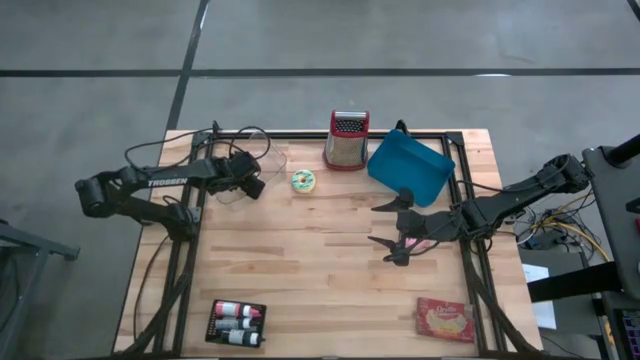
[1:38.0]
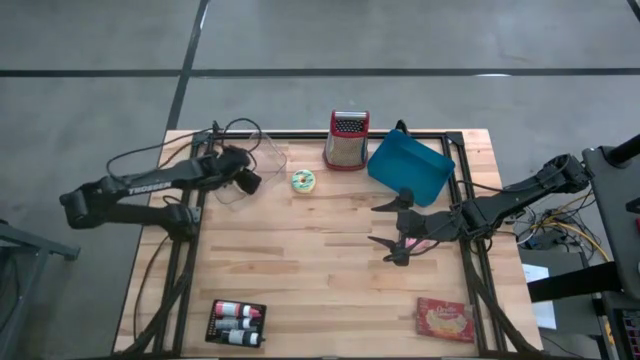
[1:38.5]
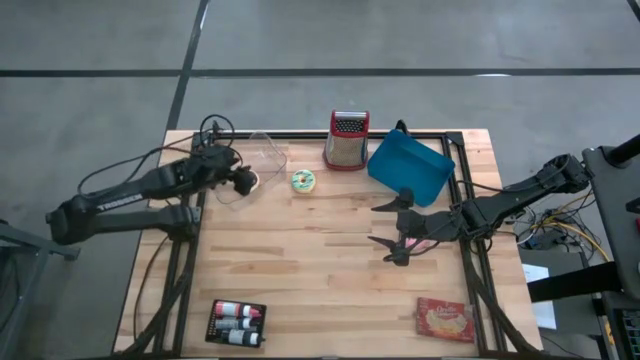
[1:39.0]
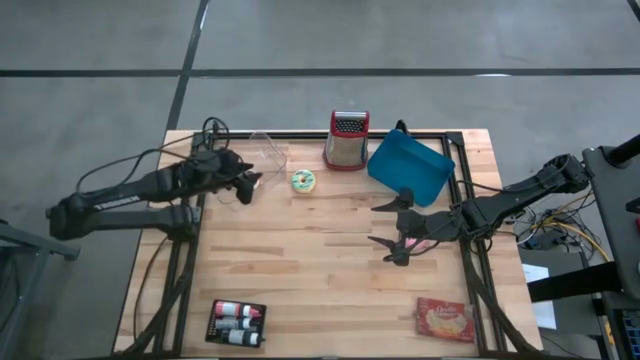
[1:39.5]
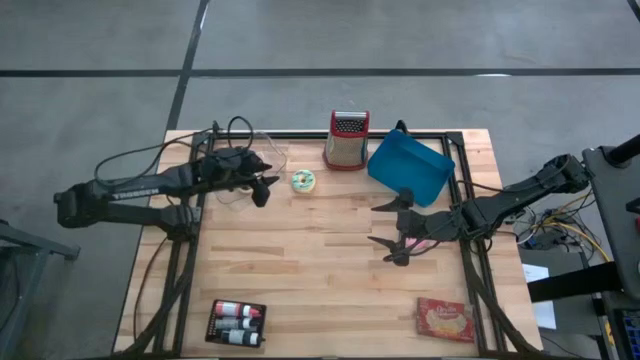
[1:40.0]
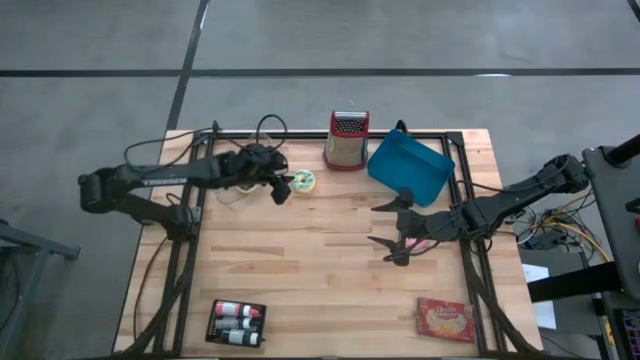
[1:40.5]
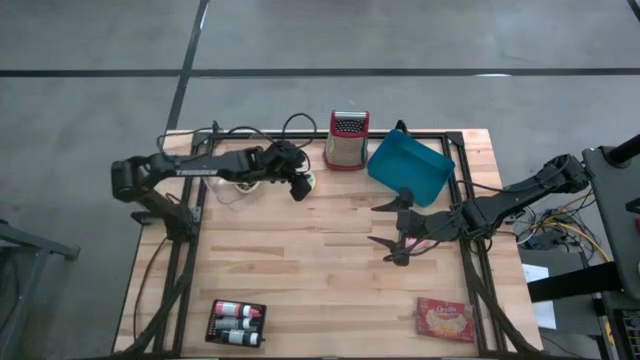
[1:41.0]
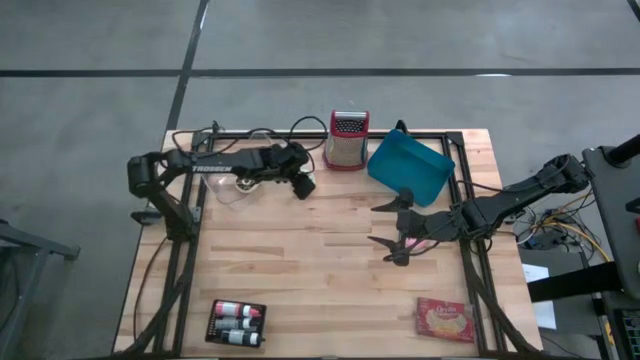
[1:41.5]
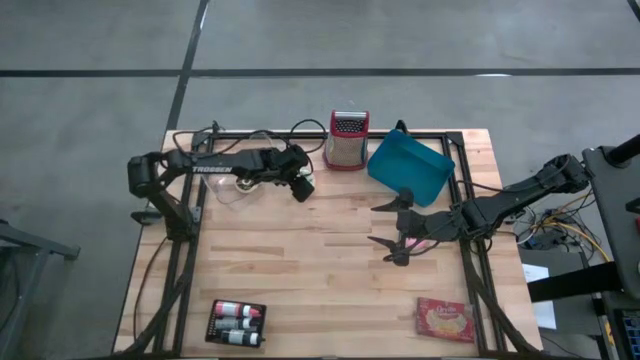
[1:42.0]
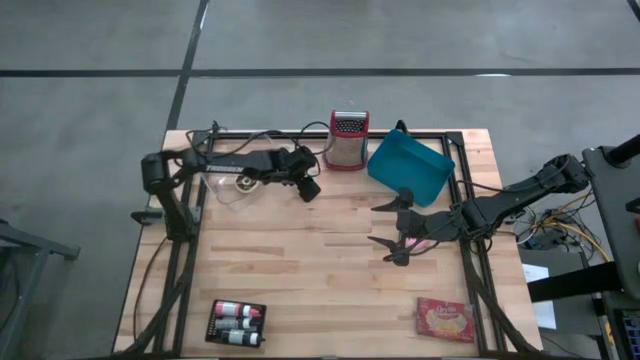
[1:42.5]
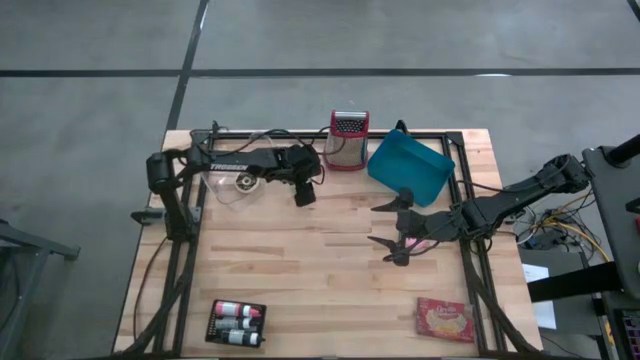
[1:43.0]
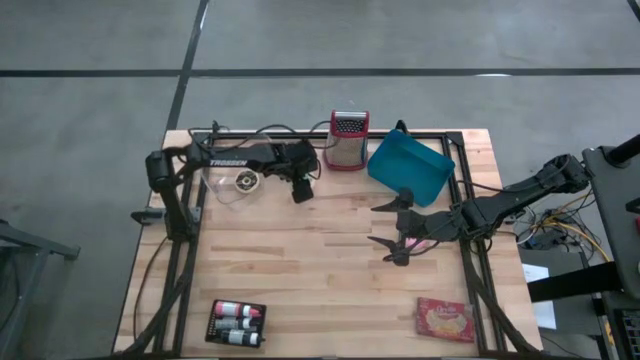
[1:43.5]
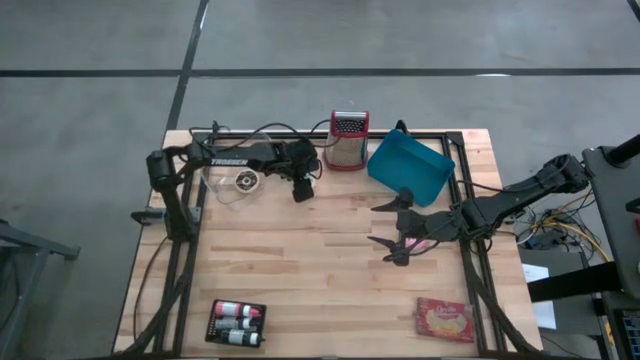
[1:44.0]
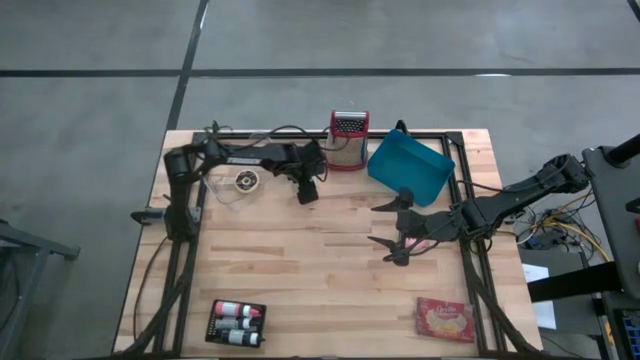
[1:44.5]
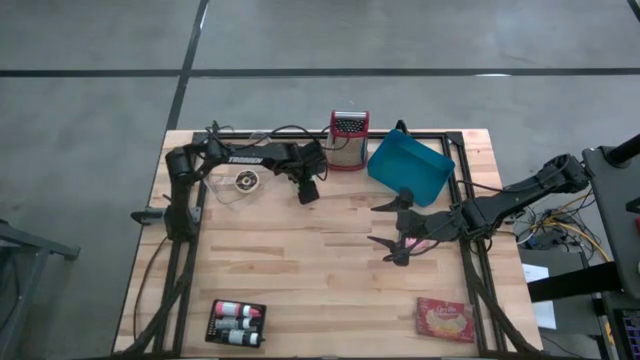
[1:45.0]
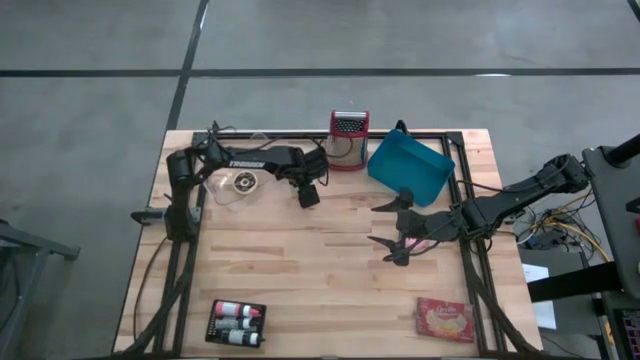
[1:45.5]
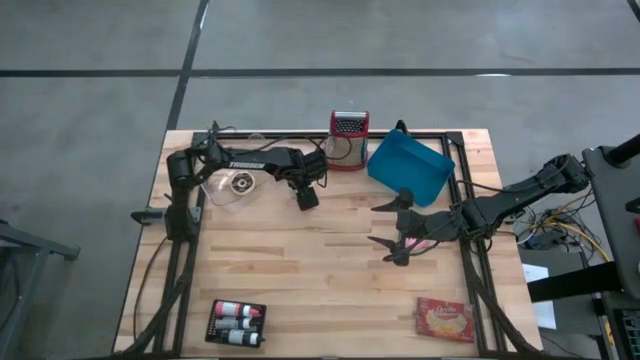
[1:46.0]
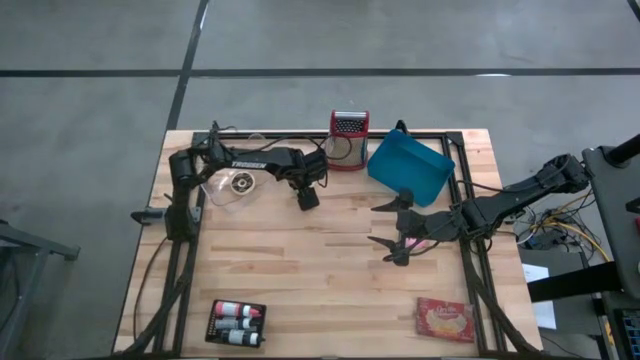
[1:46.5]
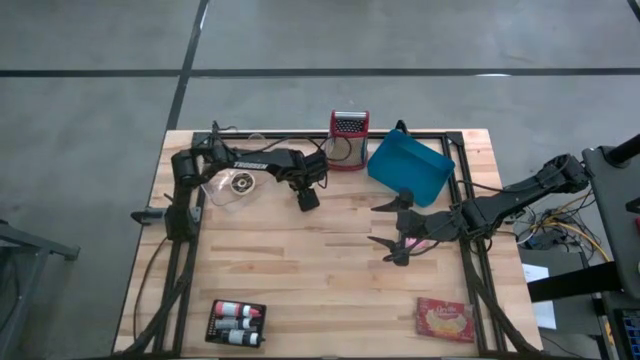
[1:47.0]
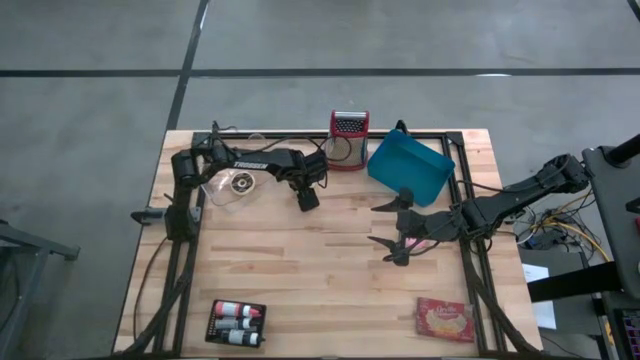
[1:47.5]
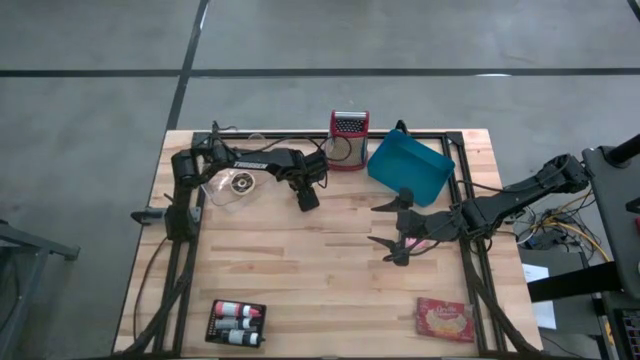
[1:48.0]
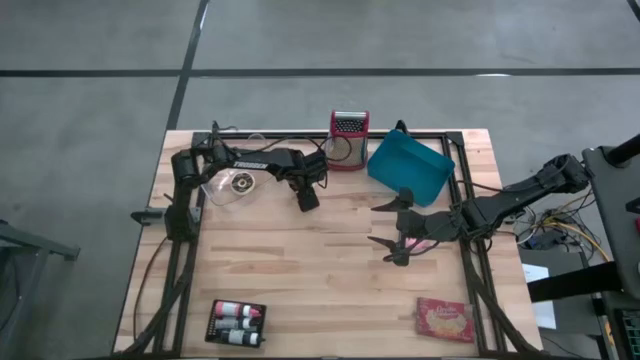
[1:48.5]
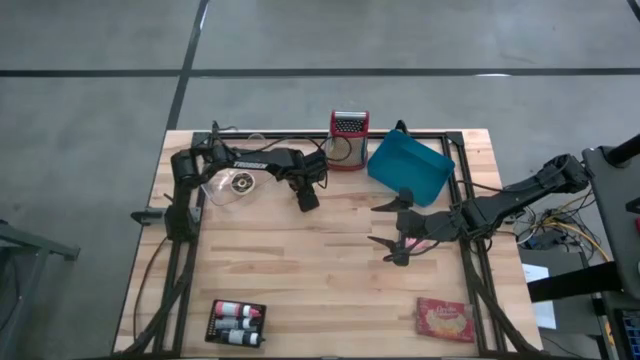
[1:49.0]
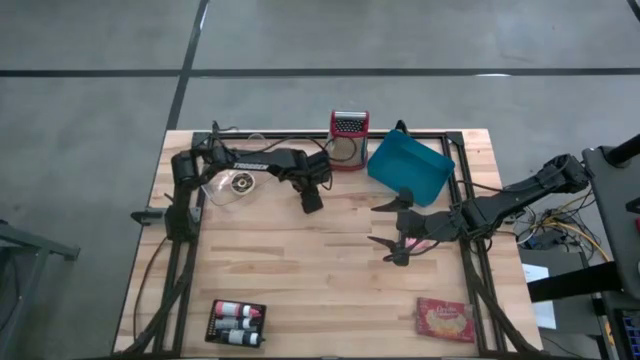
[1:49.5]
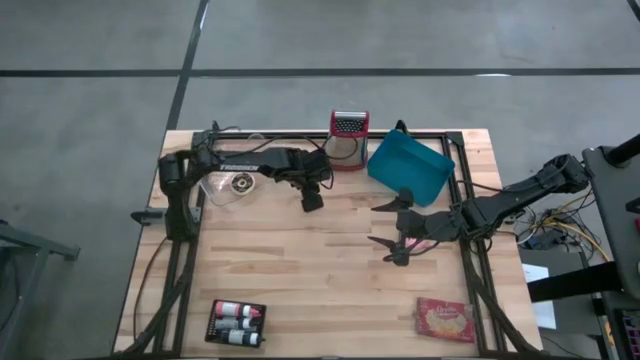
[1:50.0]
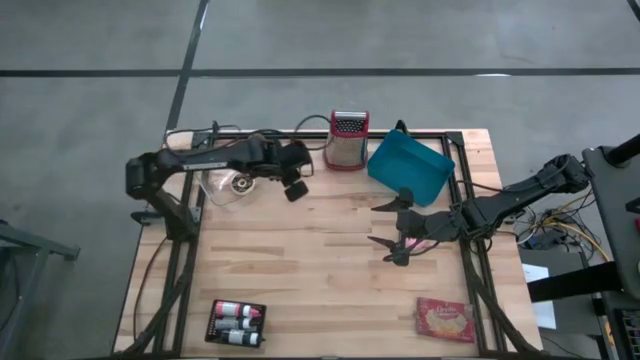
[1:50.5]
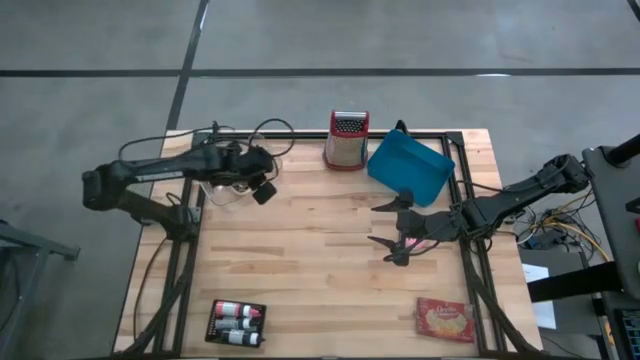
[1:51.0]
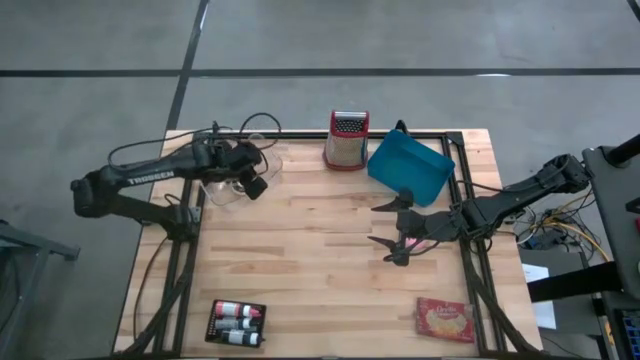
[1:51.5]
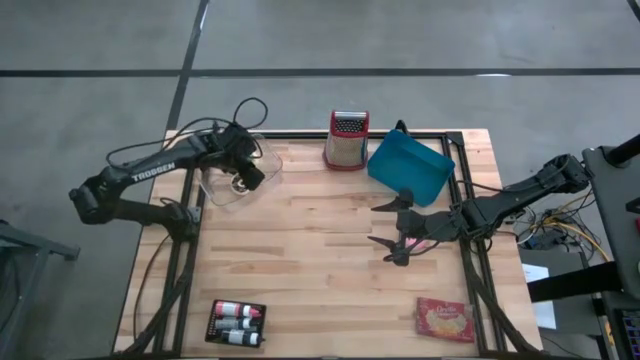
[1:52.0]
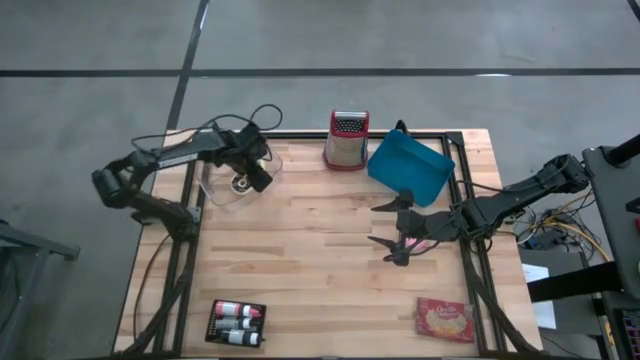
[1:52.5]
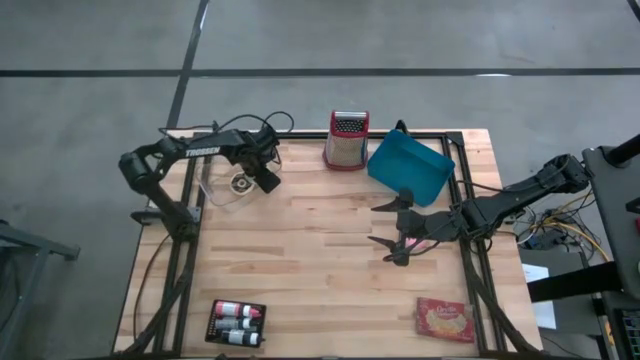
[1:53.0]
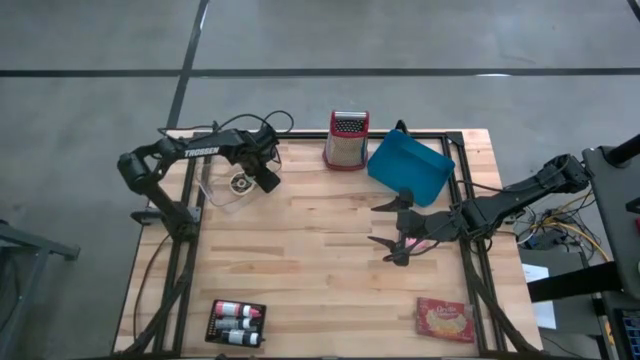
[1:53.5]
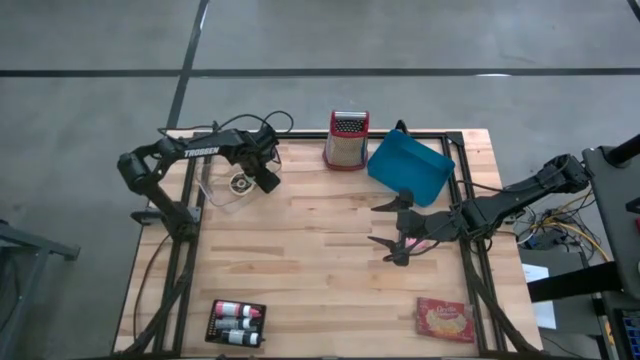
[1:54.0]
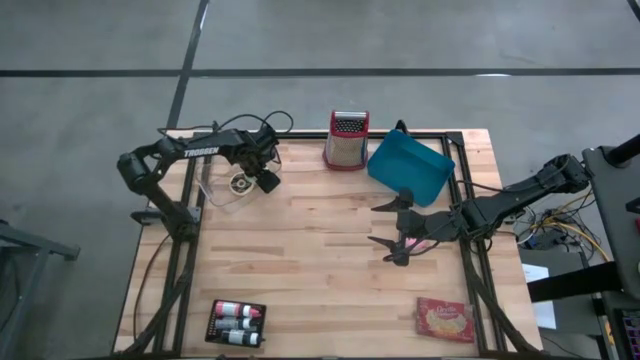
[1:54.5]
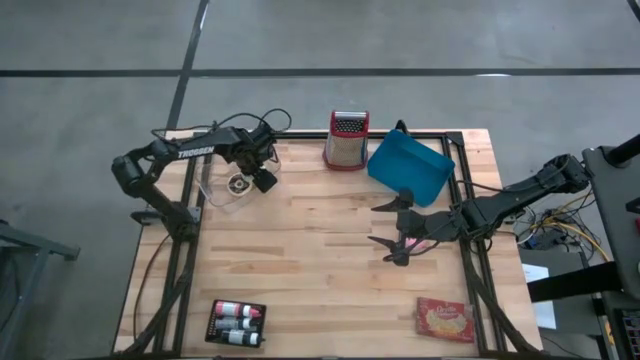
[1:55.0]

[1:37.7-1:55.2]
Task: Pick & Place Food Item
Put the green donut into the transparent bin

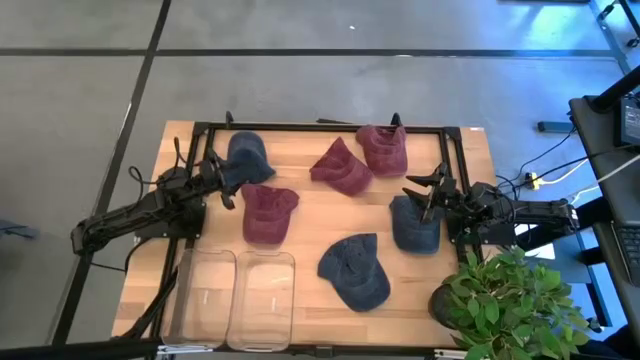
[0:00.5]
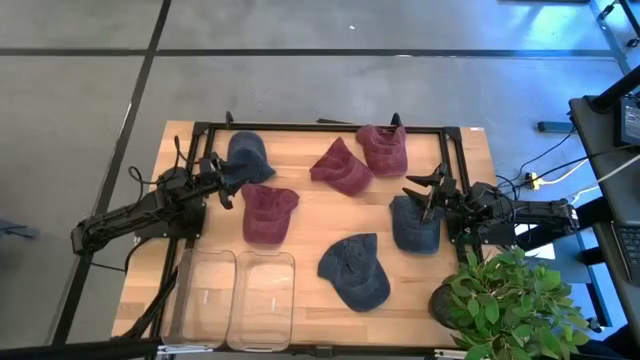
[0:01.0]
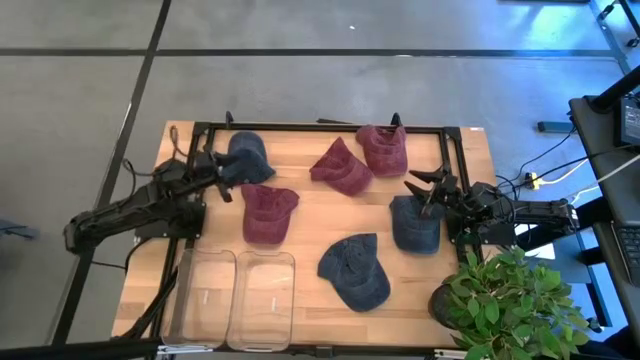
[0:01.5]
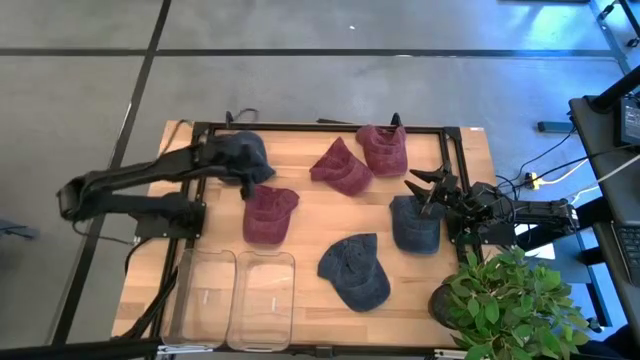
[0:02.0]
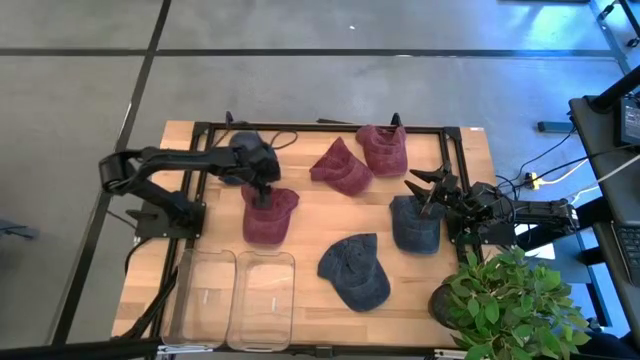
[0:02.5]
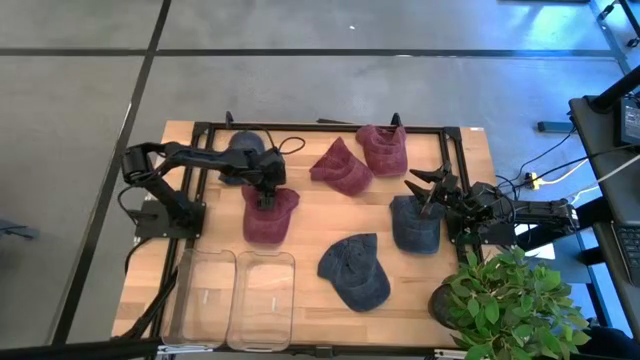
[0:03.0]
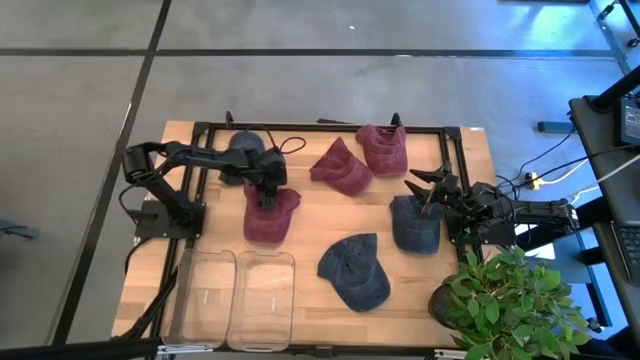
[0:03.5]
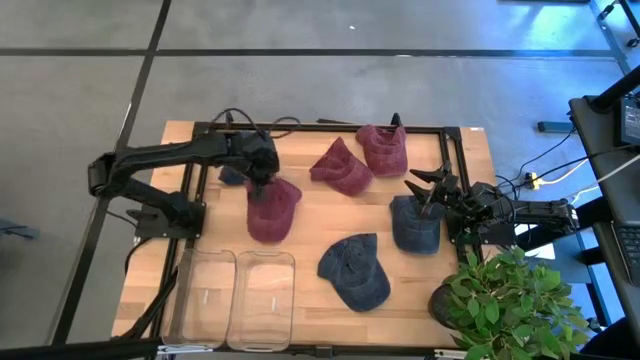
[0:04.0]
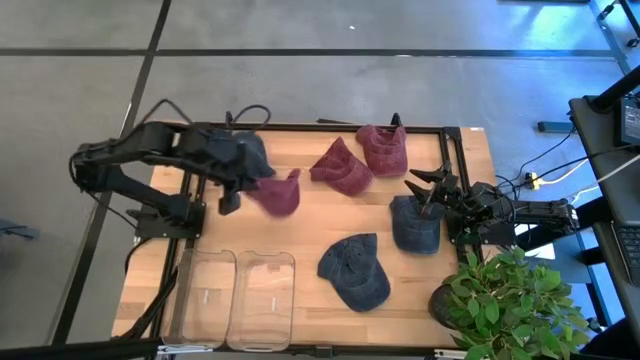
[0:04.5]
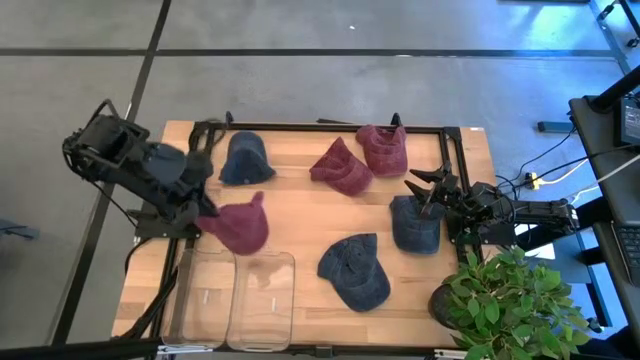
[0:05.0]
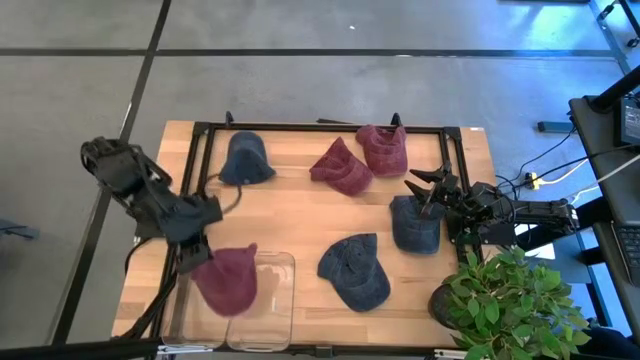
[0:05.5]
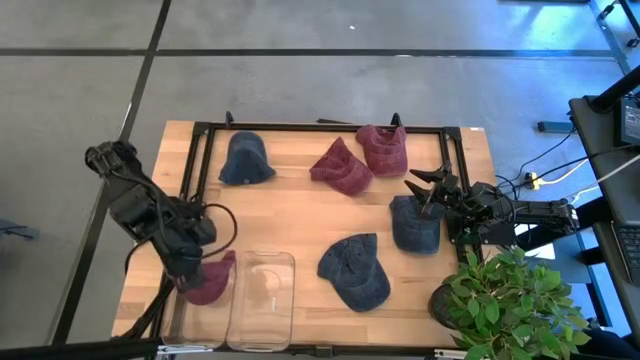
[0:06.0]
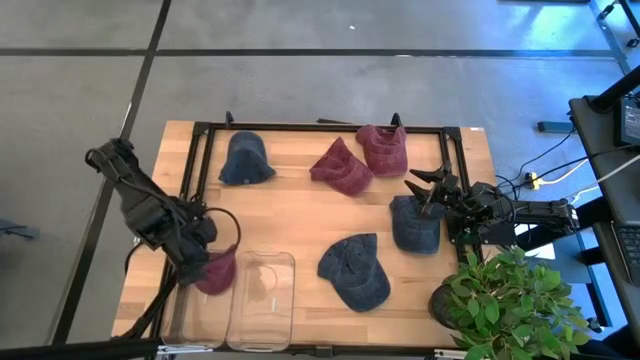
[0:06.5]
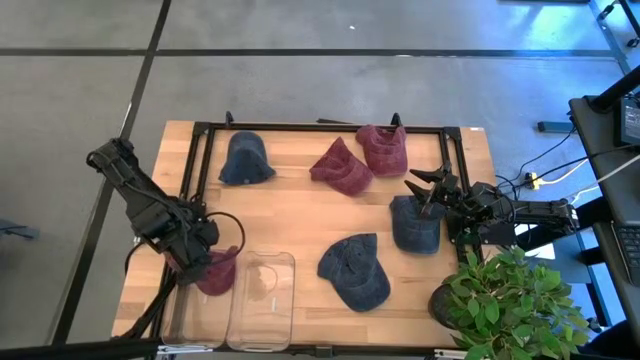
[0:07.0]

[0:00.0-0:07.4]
Task: Pick & Place hat
Put the bottom left red cap into the left transparent bin
